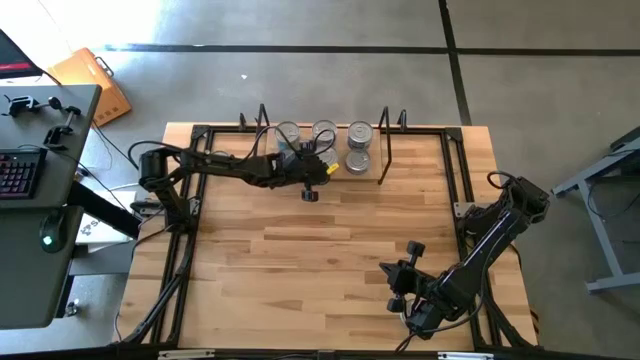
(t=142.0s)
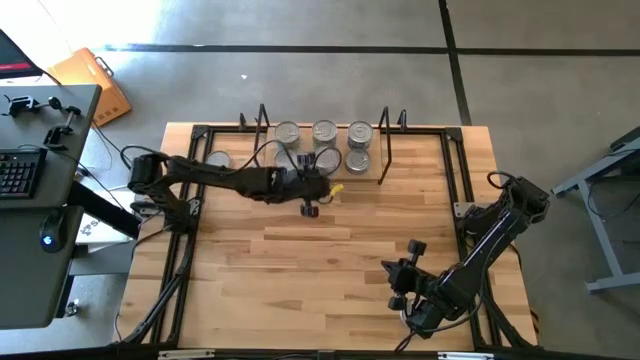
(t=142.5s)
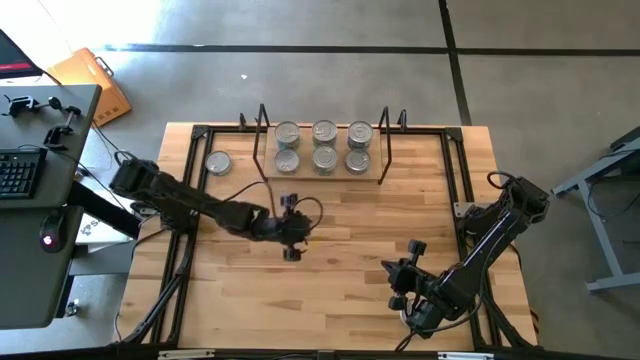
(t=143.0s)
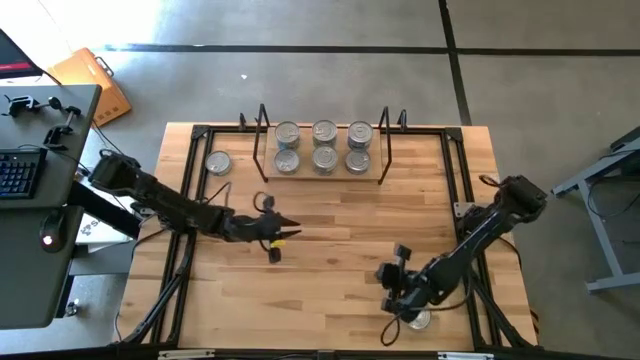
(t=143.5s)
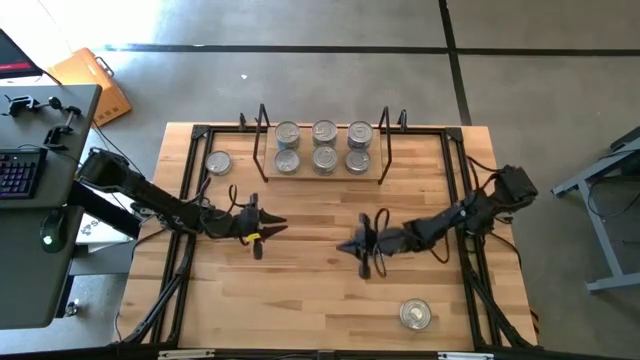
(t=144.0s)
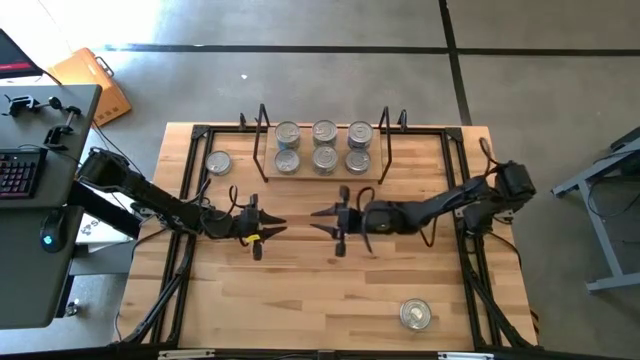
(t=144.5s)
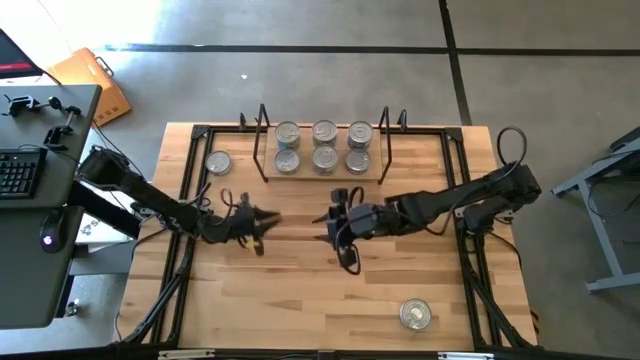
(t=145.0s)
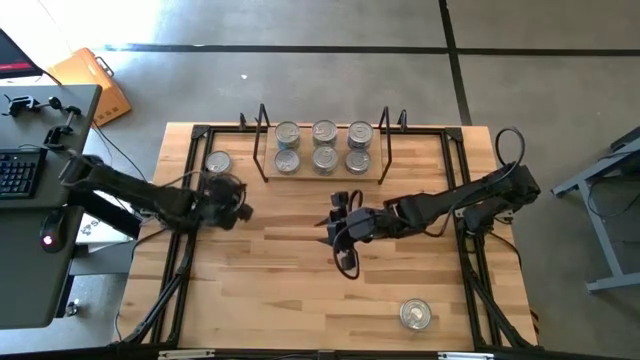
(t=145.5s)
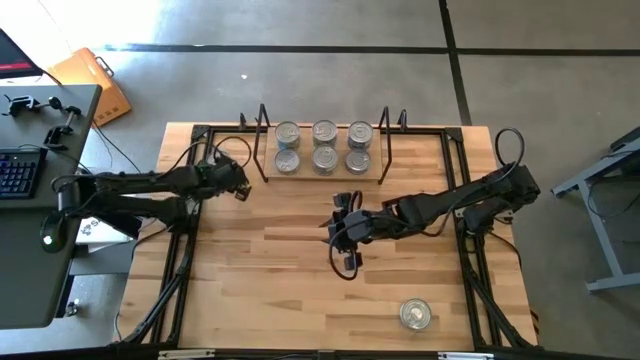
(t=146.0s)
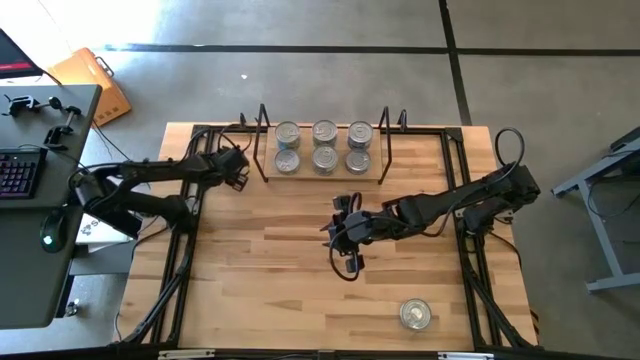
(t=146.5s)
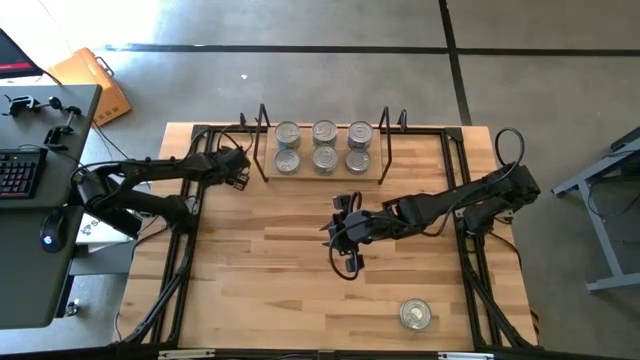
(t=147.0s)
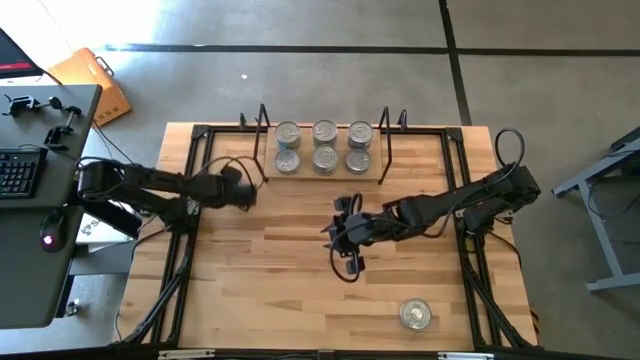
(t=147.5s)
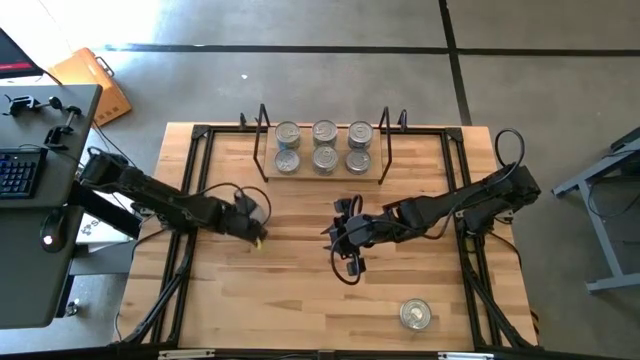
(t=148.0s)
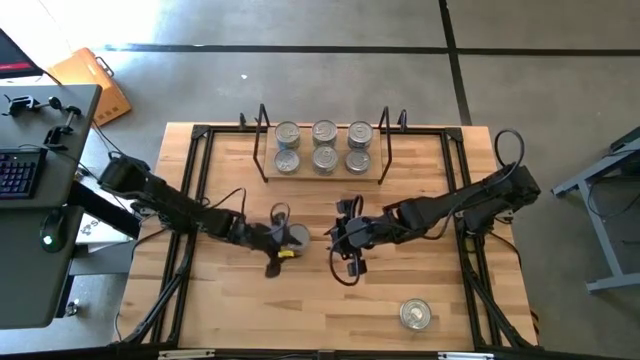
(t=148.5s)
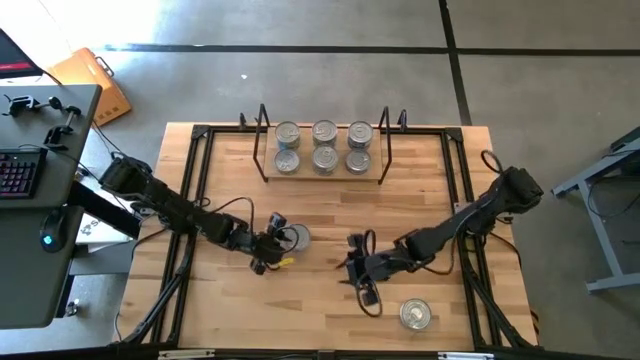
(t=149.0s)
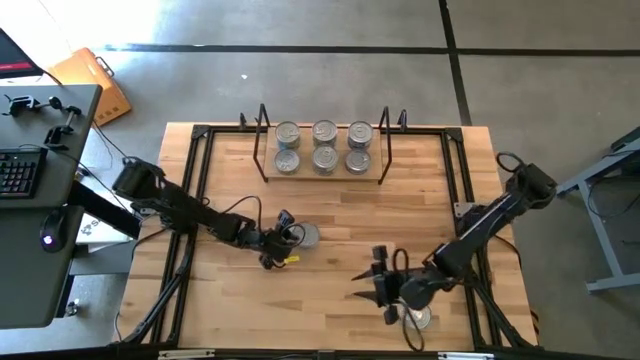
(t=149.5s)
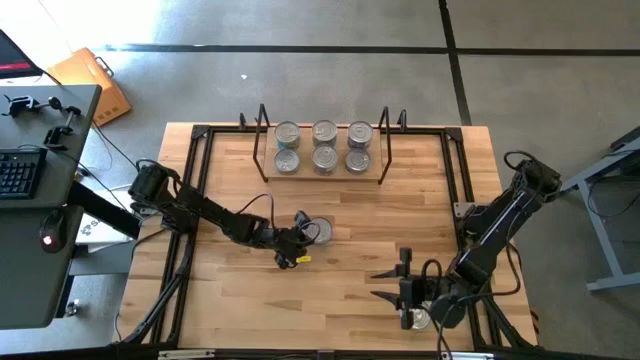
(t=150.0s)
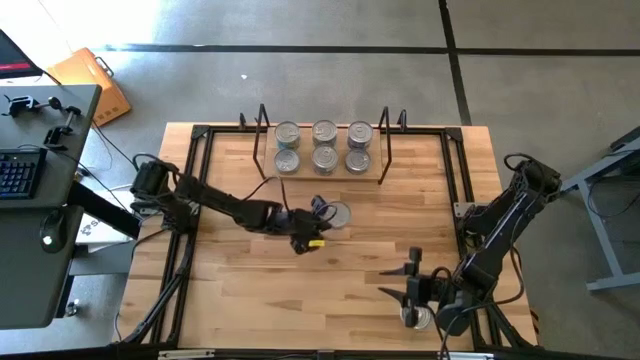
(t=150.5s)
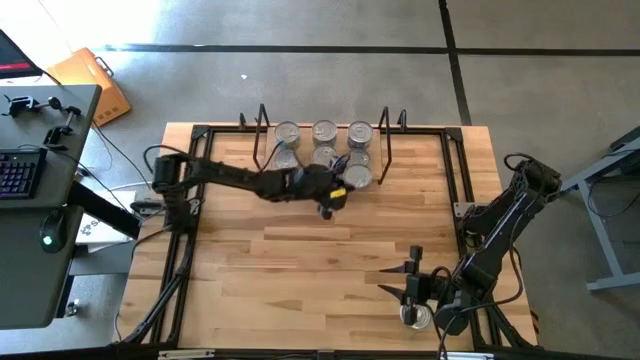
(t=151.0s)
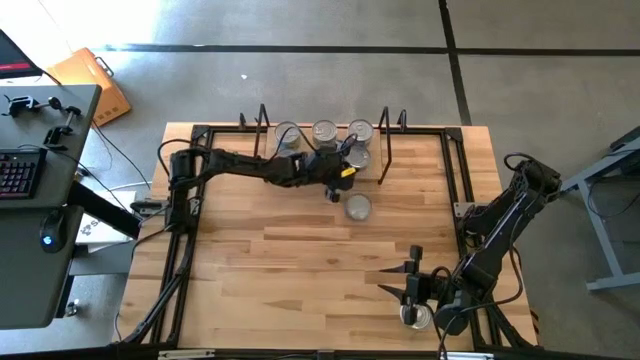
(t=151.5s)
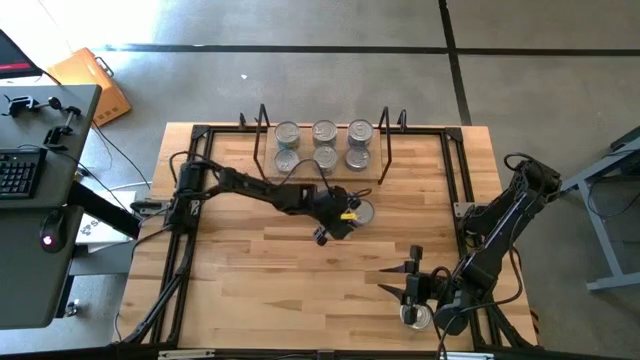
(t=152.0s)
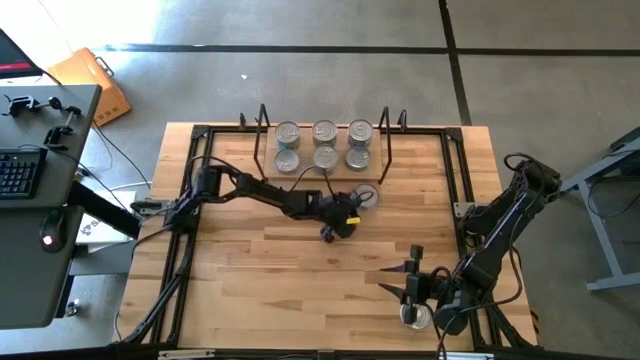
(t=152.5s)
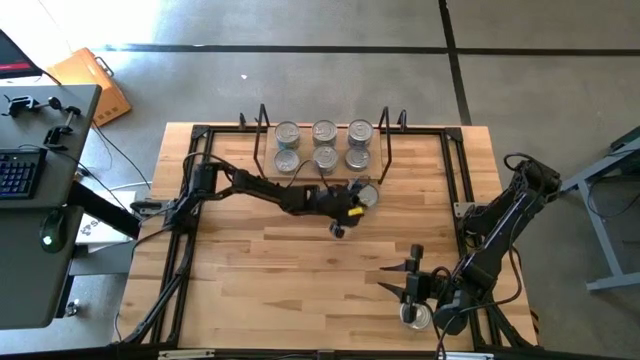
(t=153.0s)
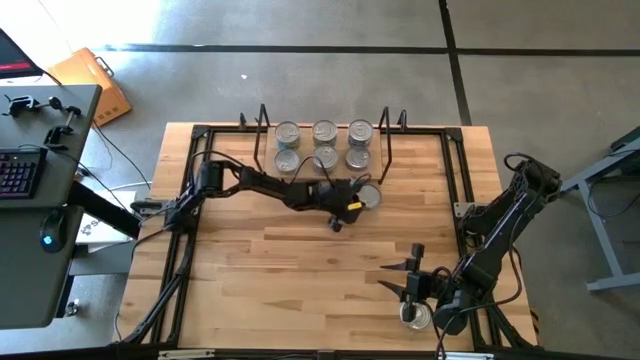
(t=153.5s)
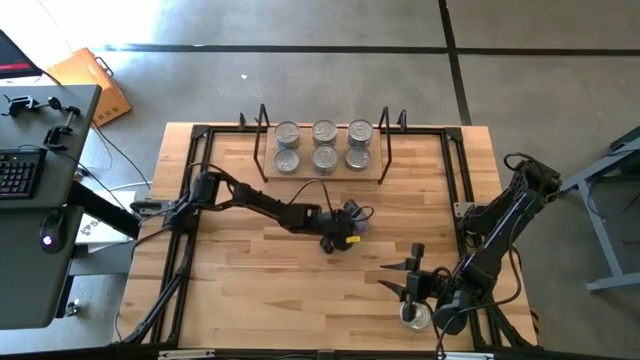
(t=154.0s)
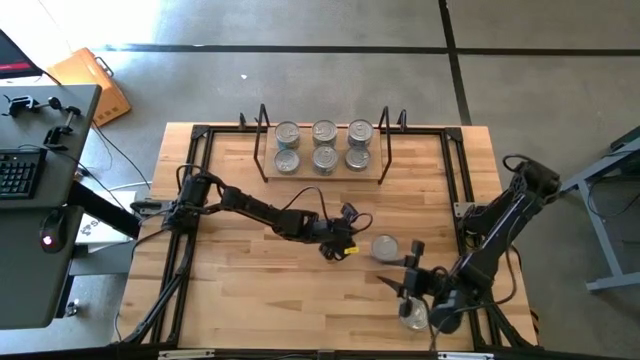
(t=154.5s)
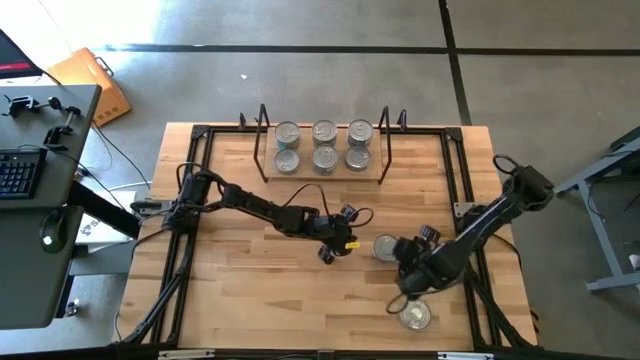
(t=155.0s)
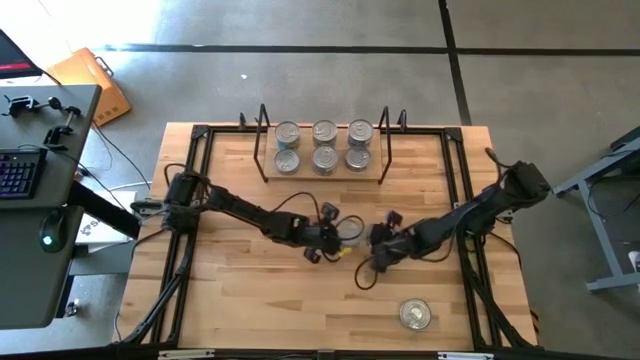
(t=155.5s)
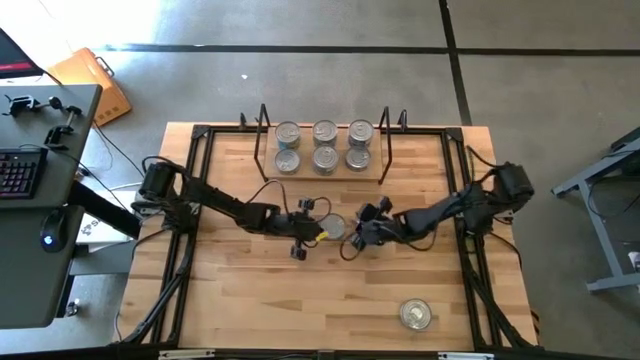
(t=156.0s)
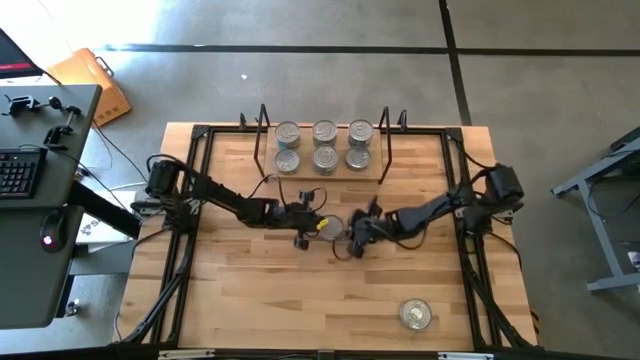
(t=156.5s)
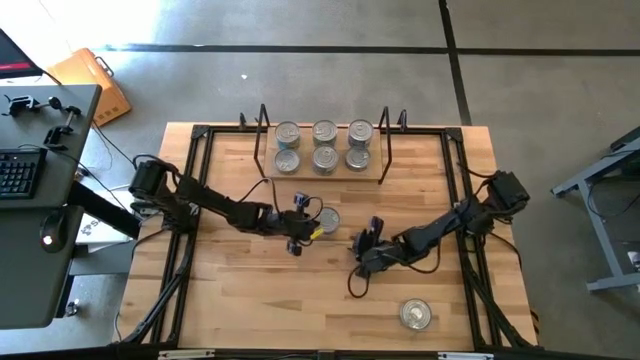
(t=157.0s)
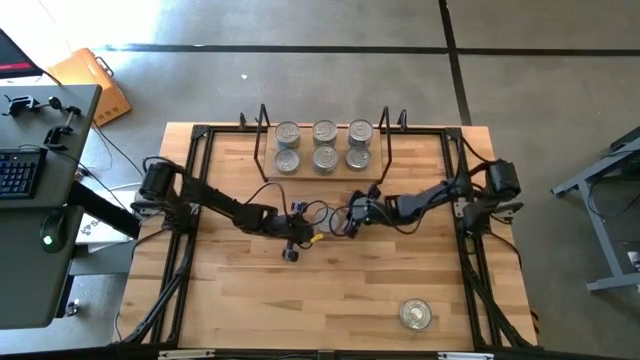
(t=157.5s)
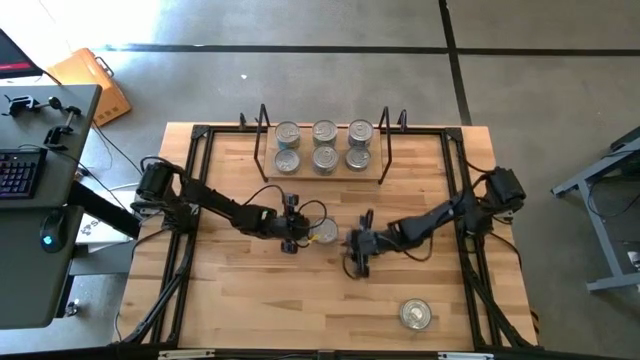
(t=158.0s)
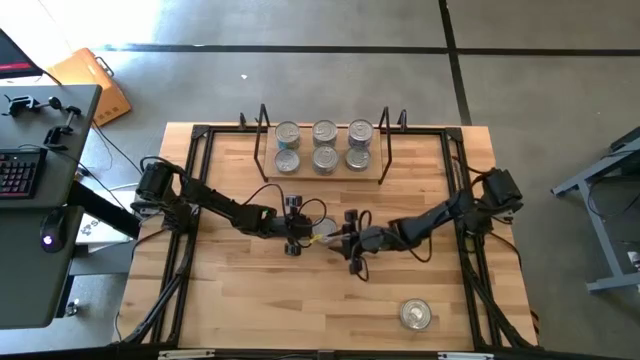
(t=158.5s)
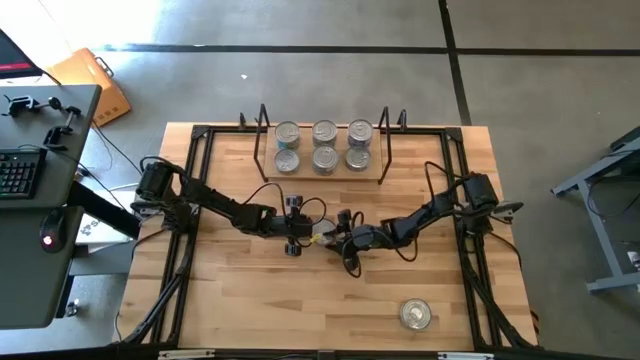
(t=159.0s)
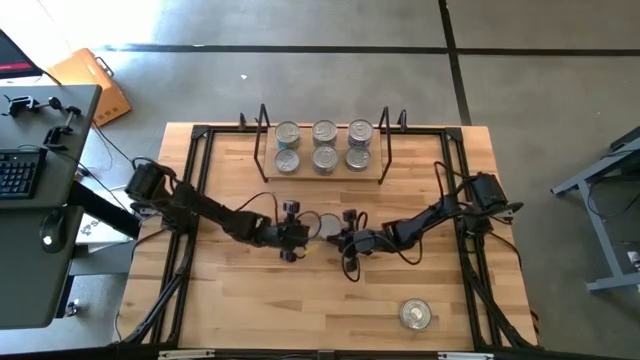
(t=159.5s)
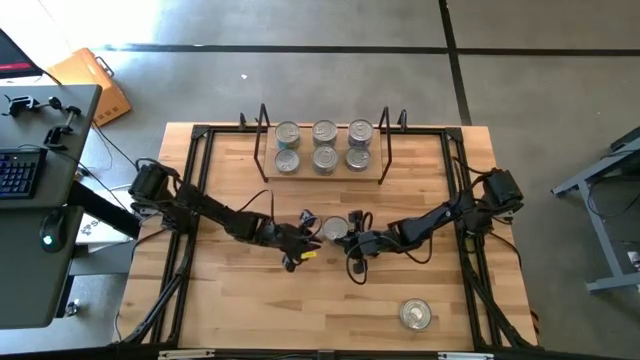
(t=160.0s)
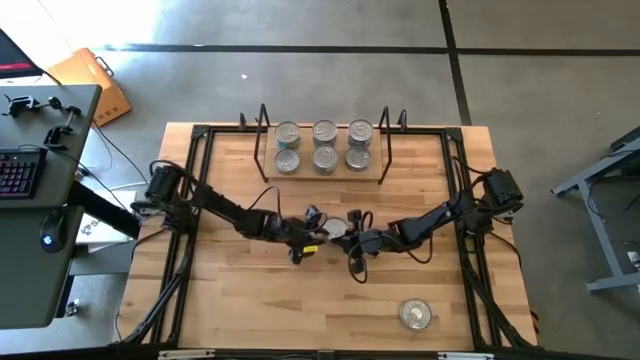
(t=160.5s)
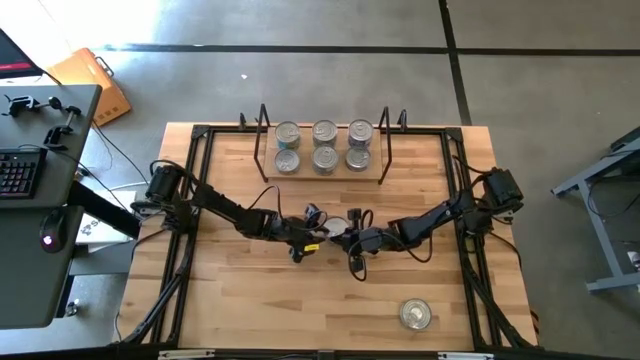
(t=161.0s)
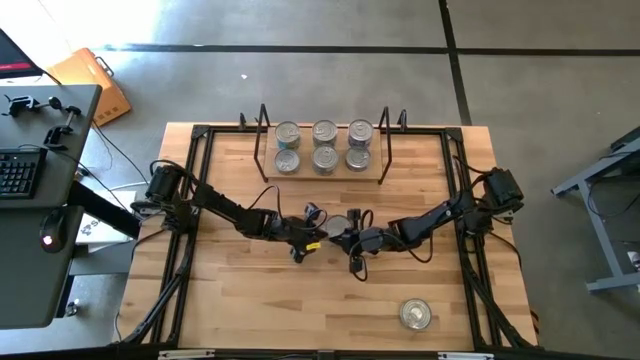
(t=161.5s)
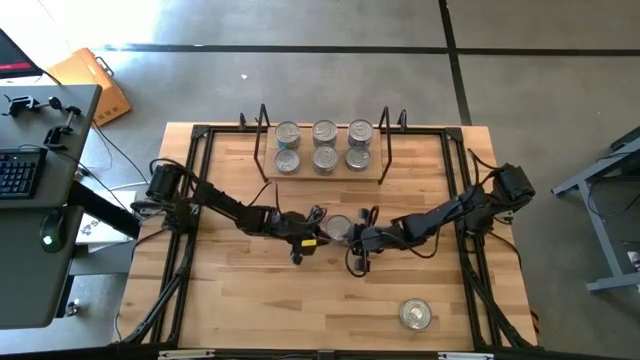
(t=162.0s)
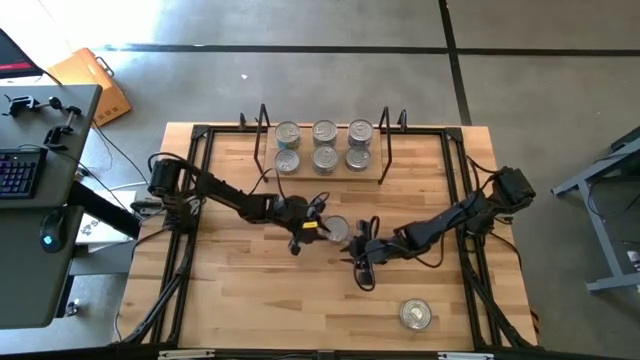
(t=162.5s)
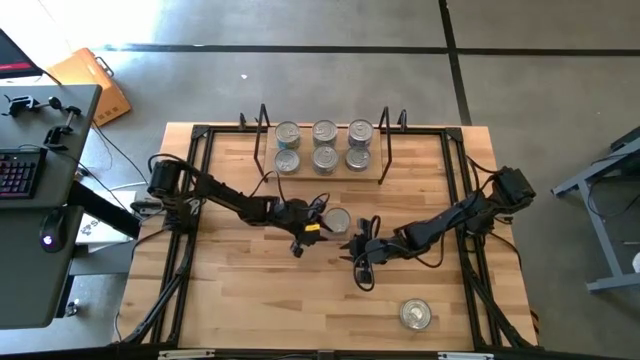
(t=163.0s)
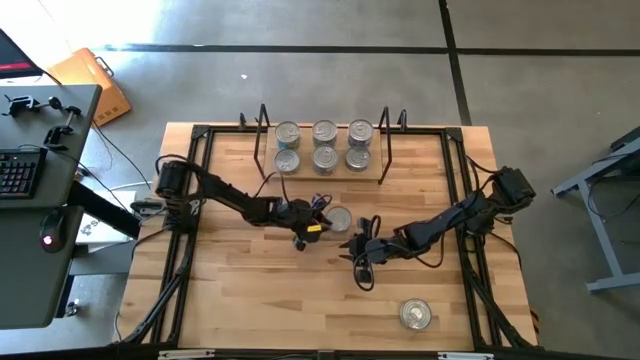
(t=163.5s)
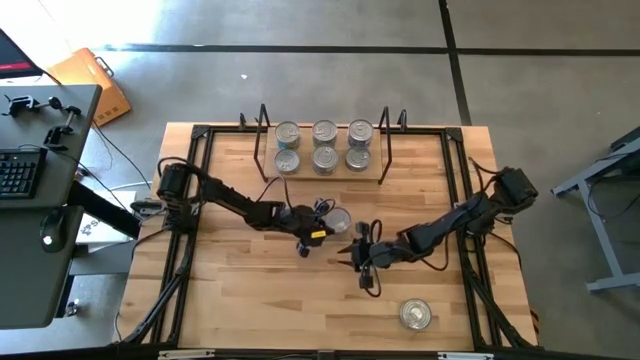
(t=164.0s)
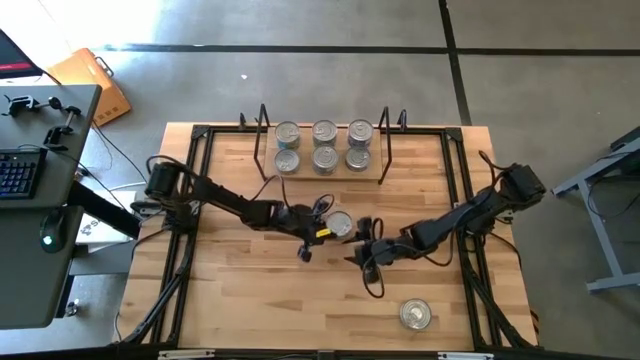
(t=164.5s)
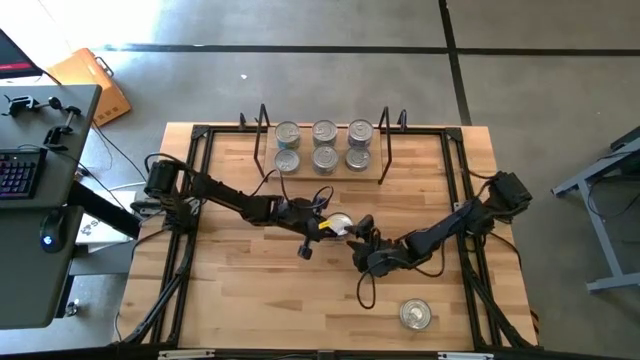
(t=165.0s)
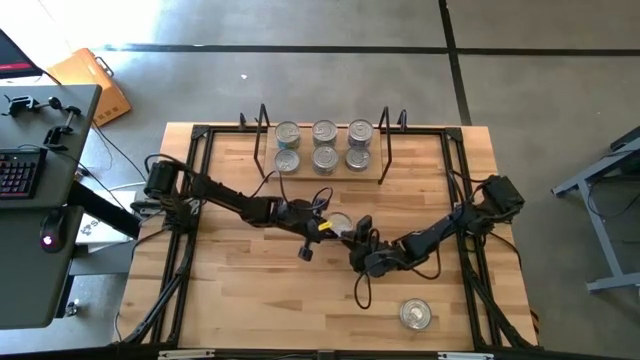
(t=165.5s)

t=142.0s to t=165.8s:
Task: Stack canned seafood by type on shelf
Stack the blue tuna can on top of the blue tuna can on the shelf
